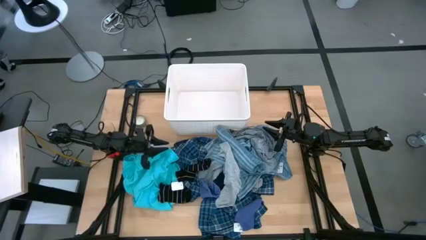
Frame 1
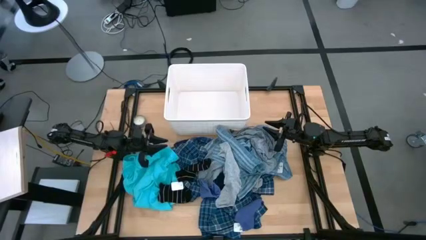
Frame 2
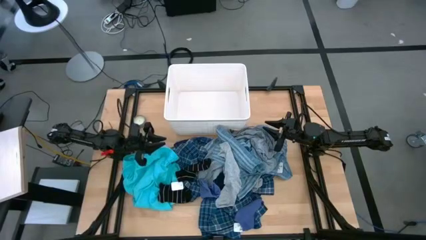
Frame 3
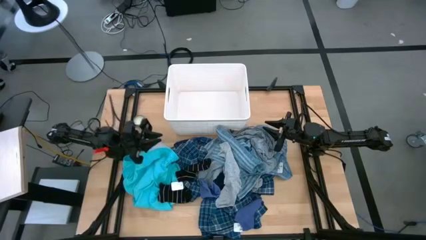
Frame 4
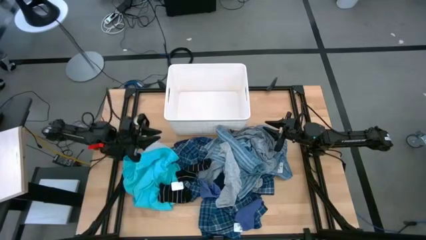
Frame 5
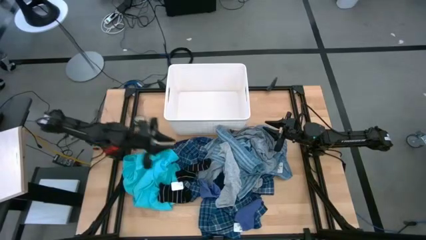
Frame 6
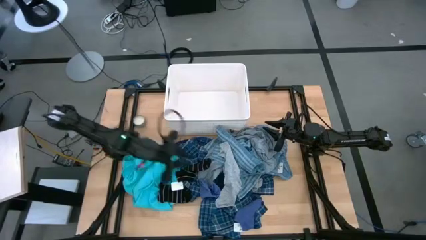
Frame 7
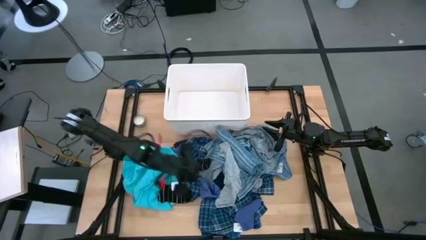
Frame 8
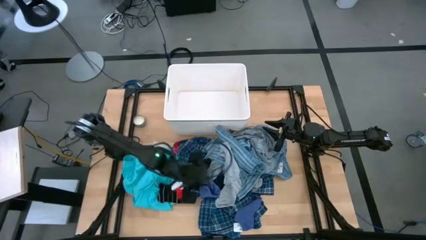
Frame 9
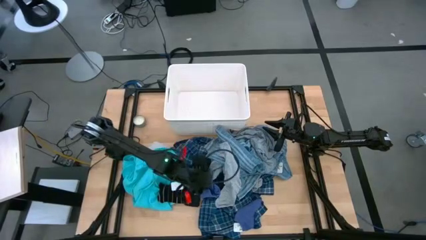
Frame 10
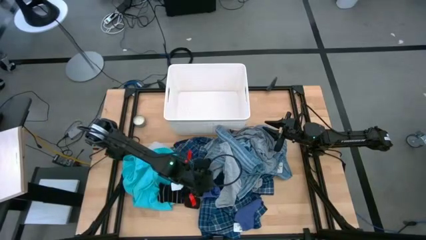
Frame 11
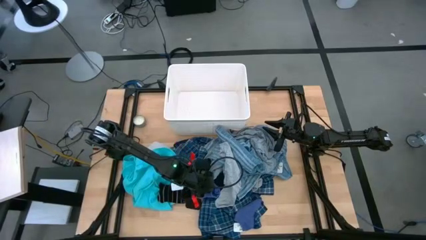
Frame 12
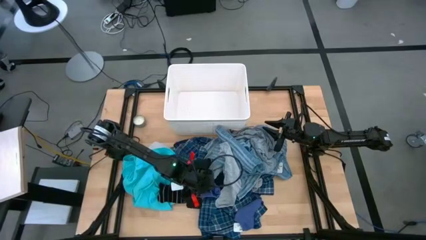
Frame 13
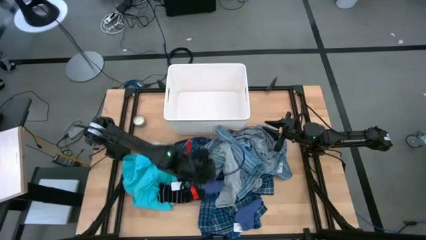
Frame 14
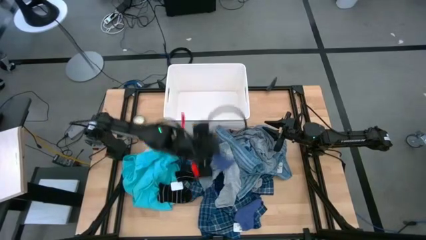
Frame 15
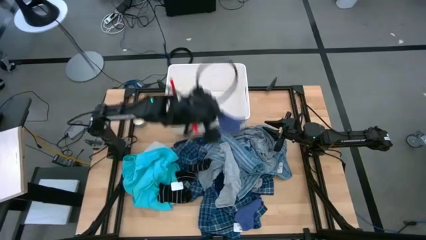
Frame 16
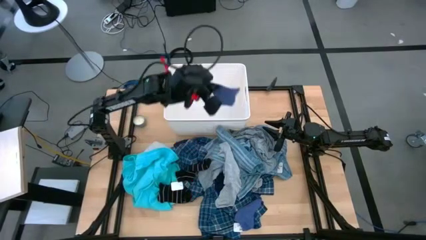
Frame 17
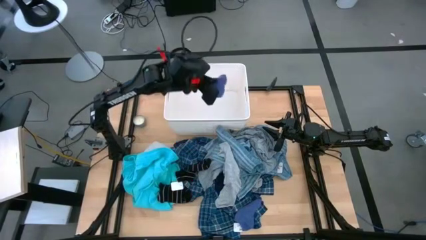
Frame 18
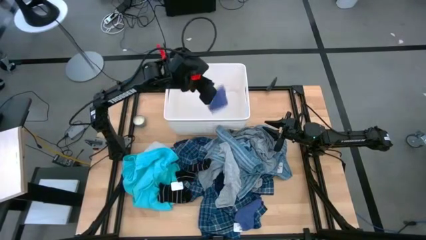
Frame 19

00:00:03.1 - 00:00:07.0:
Task: Sort clothes
Put the left purple sock into the white bin

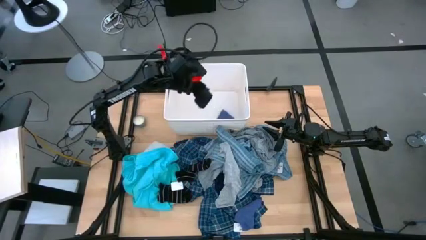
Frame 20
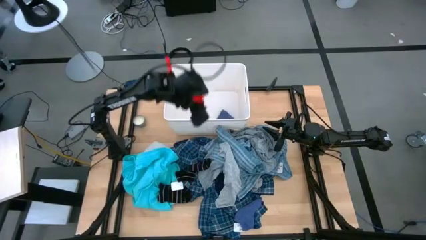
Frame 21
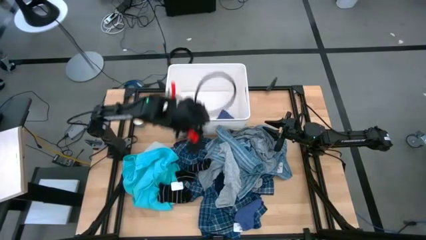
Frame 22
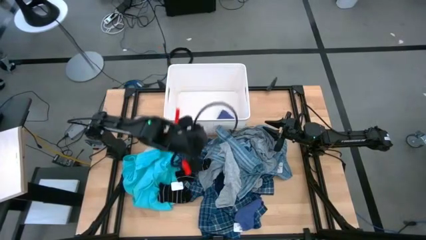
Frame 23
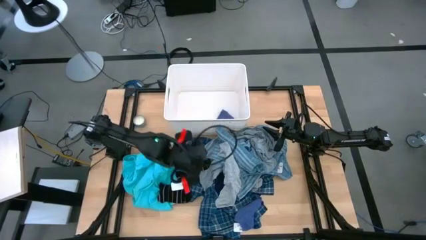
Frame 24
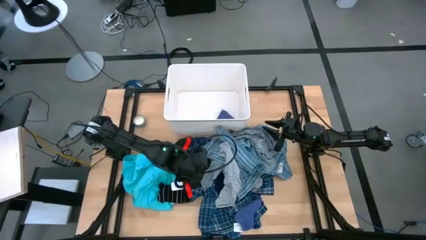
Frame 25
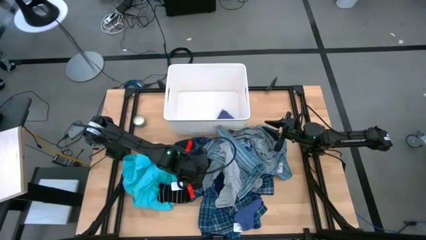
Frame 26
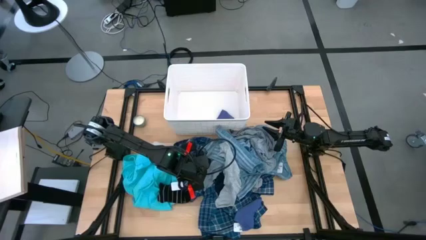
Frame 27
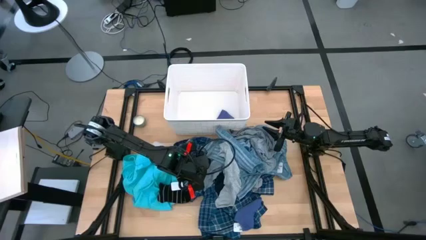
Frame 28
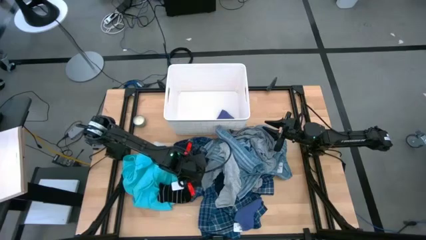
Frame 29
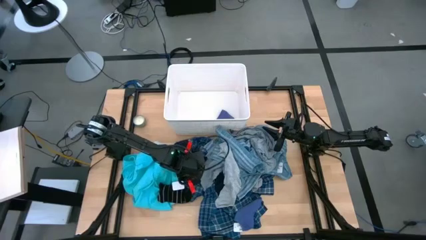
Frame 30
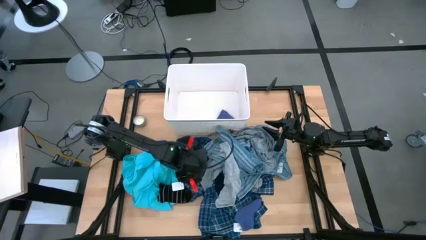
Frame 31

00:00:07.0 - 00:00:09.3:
Put the top black sock into the white bin

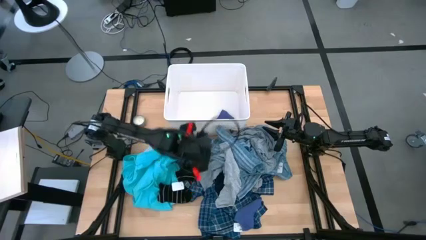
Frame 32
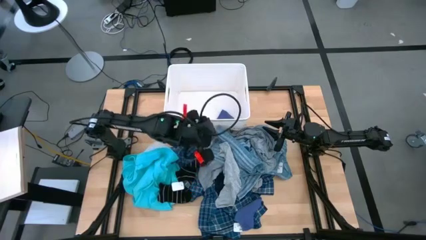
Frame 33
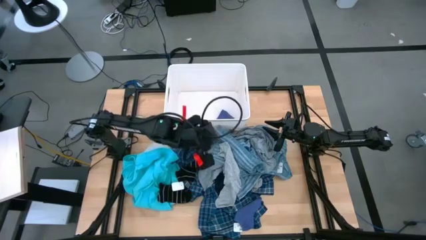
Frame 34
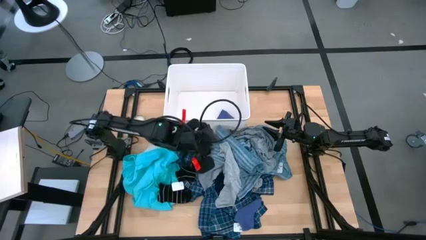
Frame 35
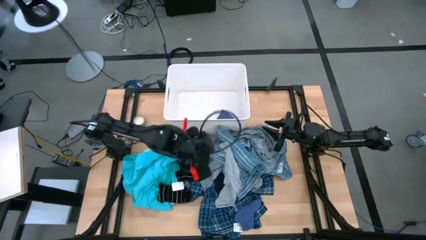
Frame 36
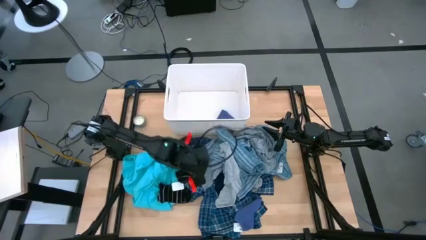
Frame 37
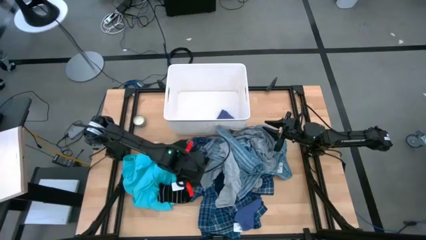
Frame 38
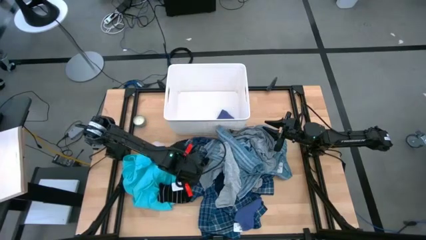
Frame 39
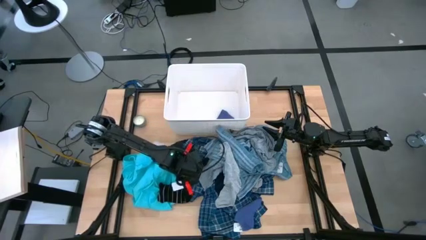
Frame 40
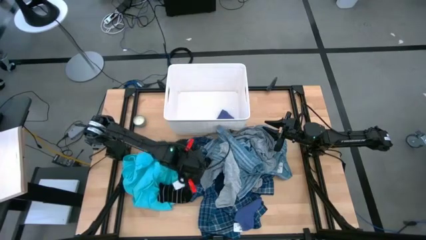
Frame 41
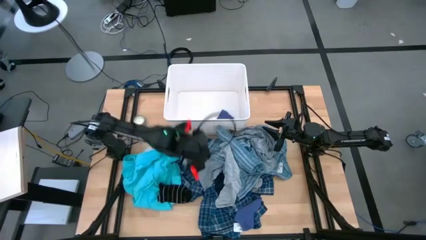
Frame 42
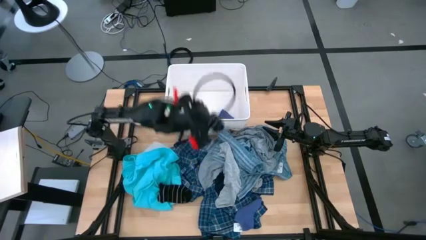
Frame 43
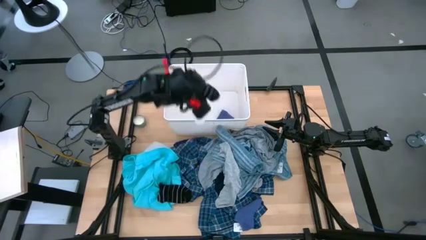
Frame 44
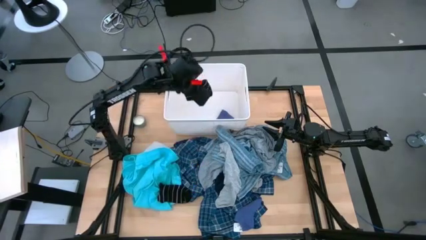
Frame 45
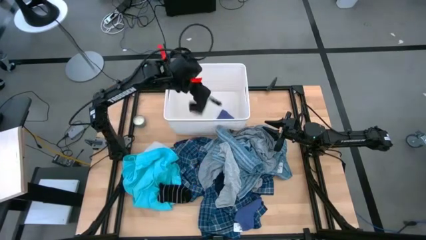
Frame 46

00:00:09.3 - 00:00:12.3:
Put the top black sock into the white bin

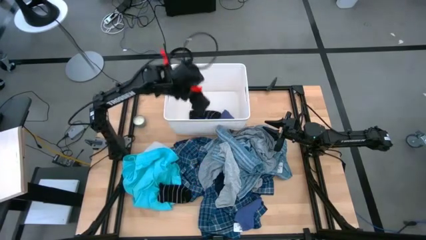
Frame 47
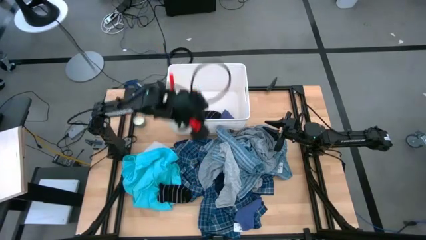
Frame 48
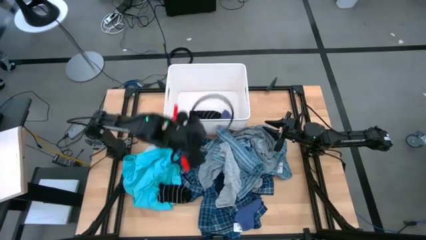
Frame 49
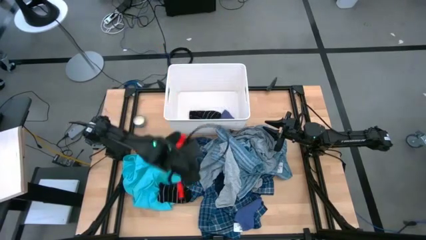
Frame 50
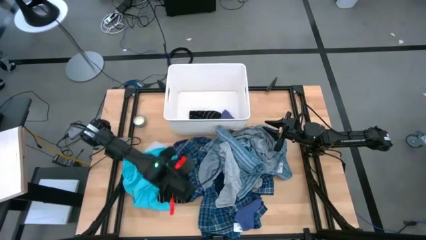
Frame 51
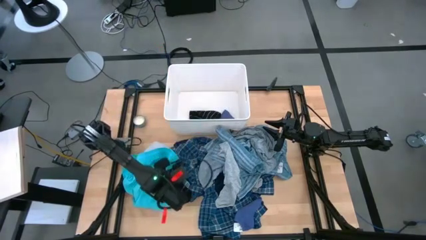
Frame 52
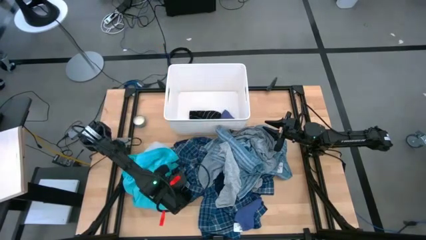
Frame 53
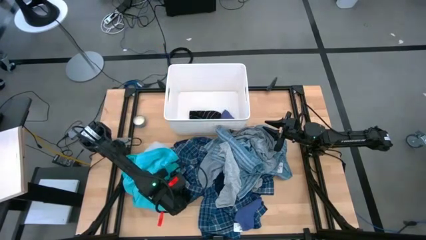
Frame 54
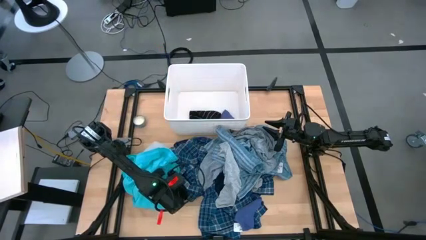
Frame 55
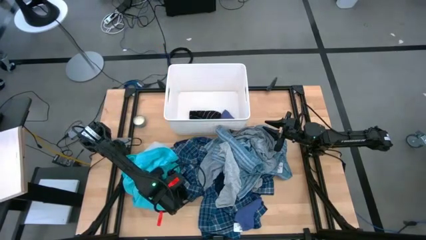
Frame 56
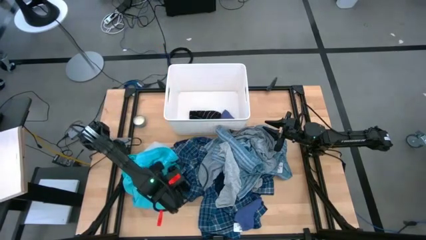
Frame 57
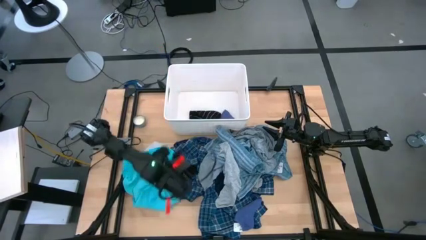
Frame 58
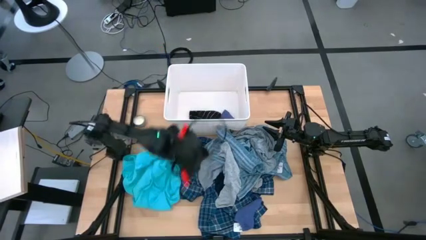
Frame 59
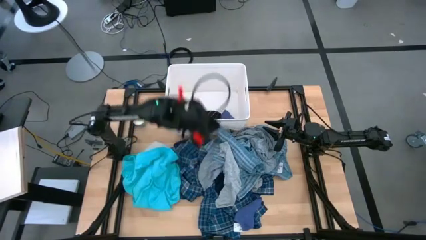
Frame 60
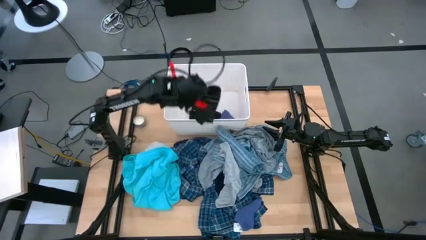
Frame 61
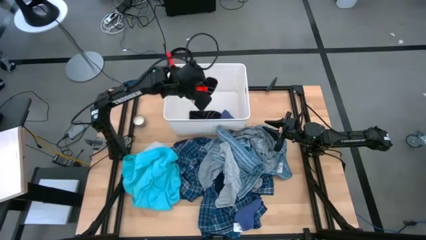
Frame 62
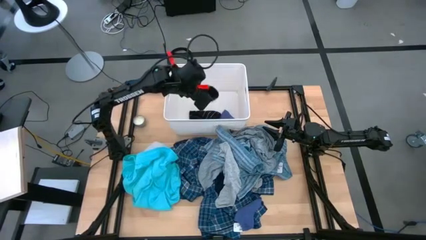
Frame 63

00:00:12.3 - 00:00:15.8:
Put the black sock into the white bin

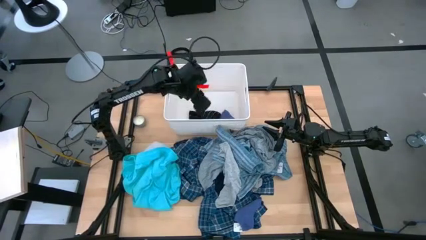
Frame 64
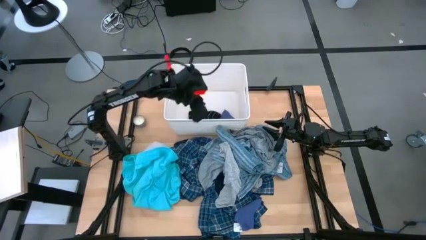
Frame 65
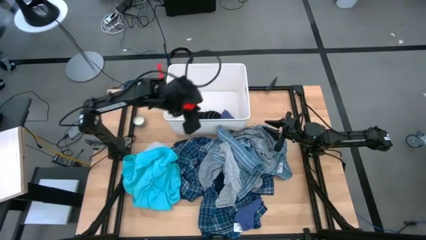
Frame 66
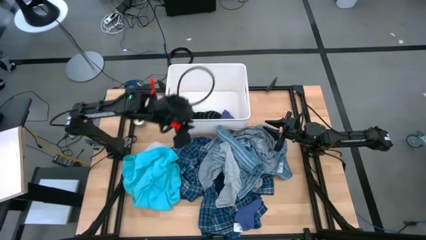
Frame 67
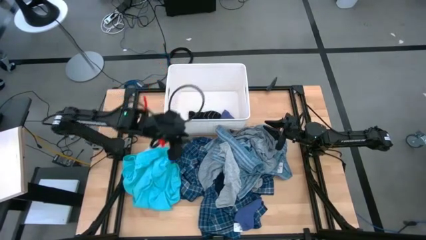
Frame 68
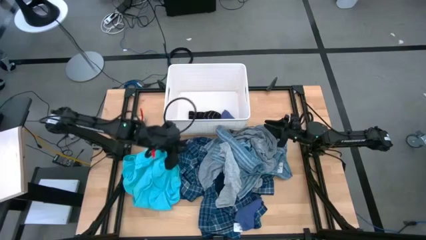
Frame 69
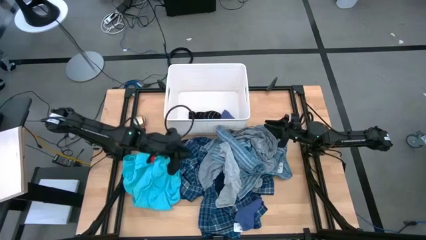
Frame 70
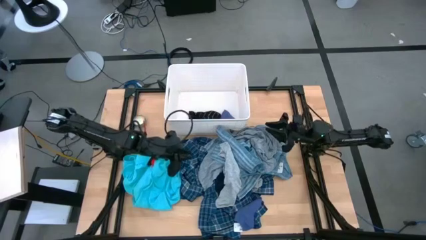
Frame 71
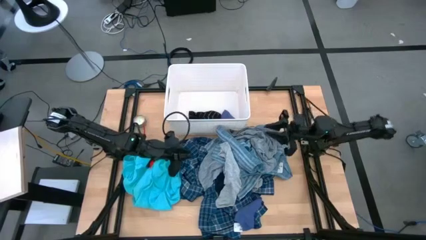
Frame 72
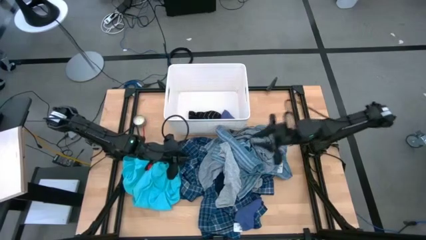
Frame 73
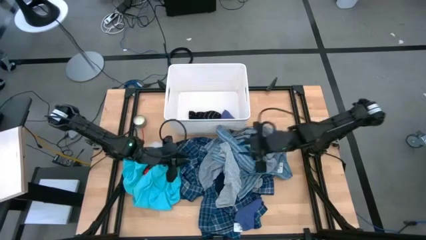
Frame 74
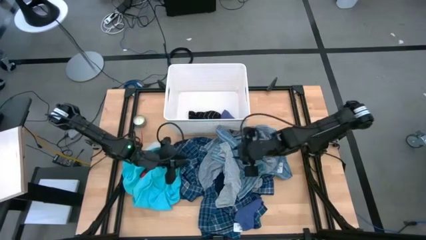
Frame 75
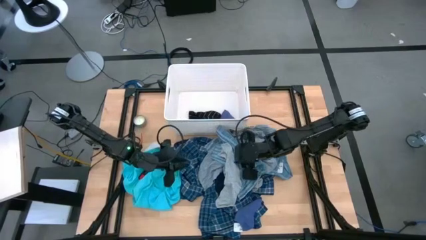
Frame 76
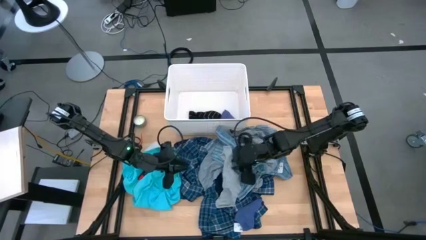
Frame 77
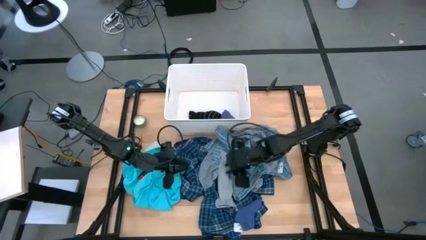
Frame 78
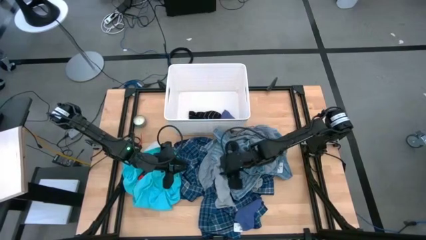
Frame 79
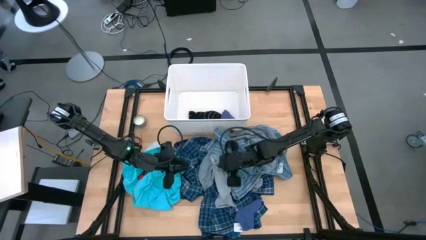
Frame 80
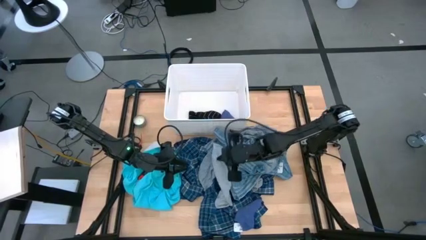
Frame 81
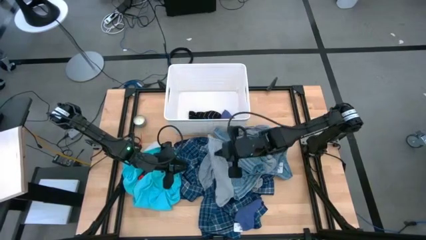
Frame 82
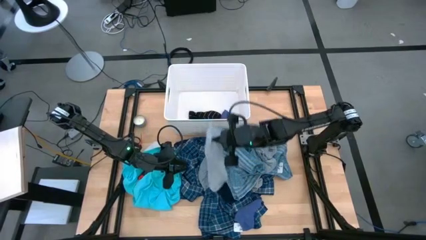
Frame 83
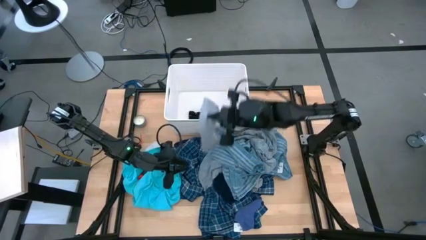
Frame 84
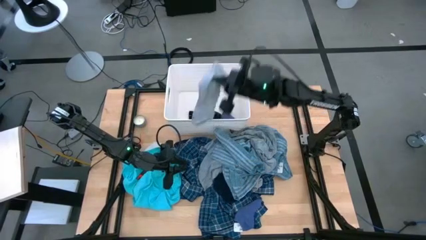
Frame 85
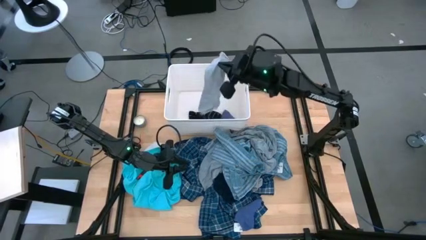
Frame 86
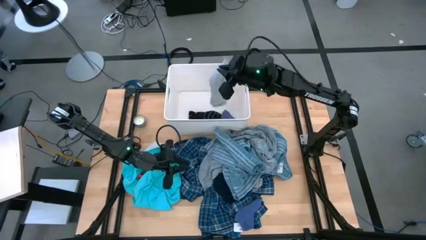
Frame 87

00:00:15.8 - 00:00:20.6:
Put the gray sock into the white bin
